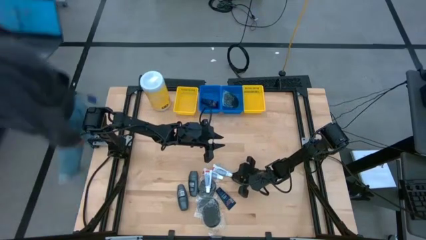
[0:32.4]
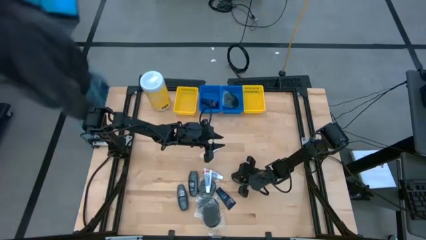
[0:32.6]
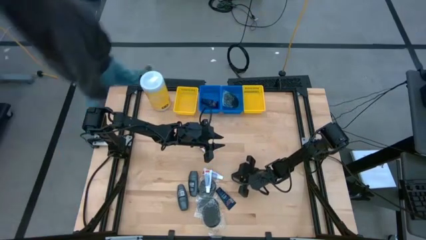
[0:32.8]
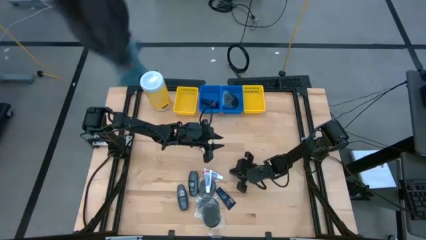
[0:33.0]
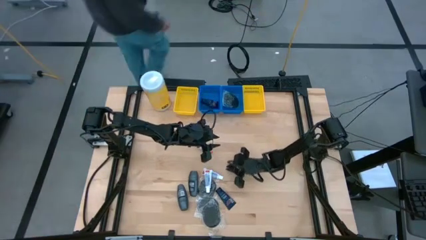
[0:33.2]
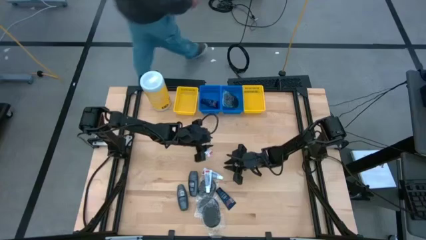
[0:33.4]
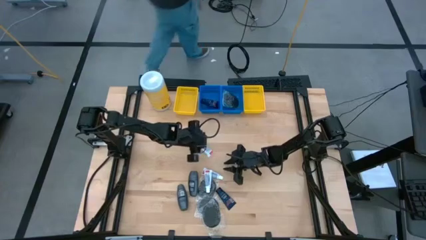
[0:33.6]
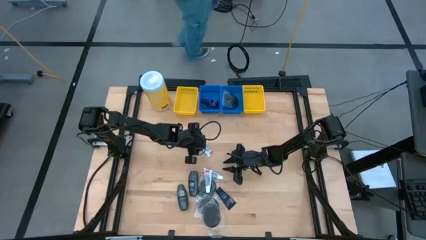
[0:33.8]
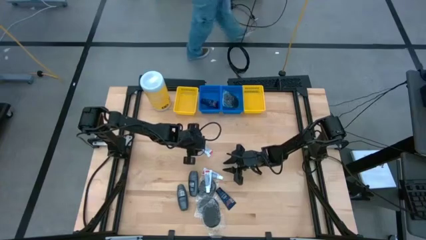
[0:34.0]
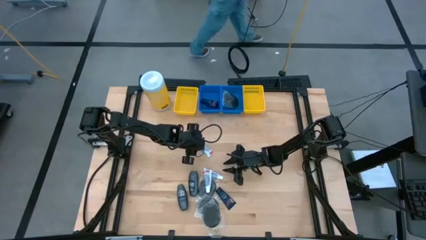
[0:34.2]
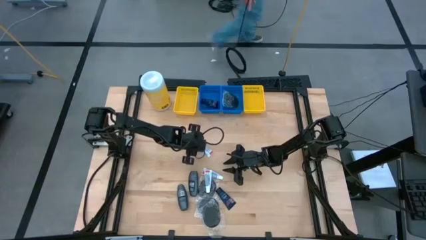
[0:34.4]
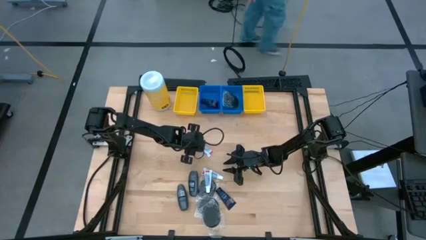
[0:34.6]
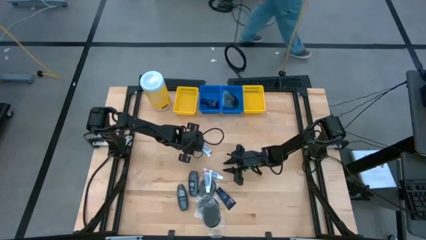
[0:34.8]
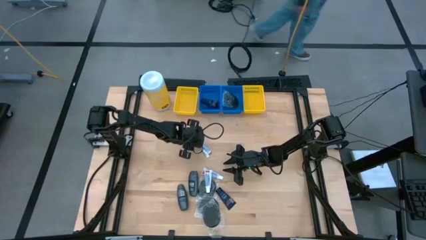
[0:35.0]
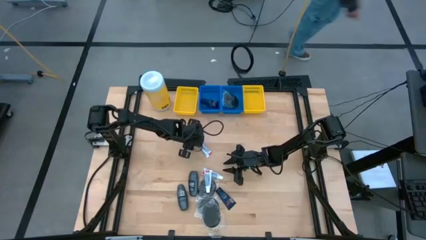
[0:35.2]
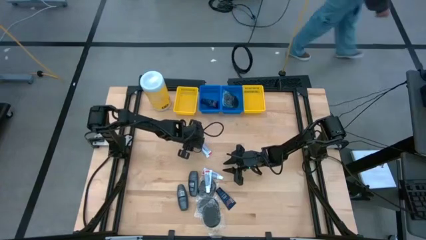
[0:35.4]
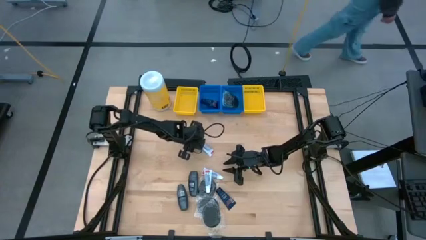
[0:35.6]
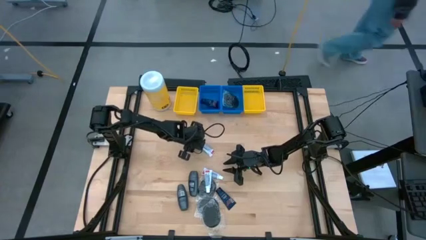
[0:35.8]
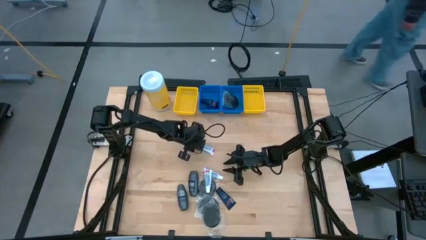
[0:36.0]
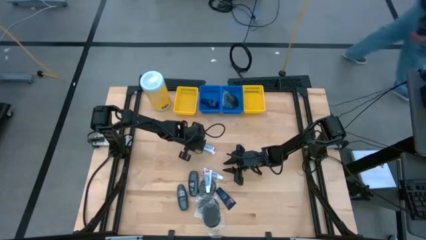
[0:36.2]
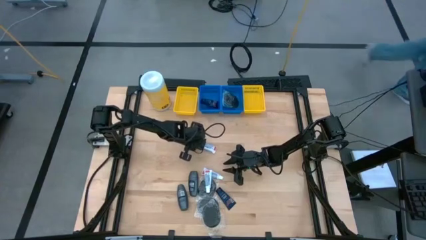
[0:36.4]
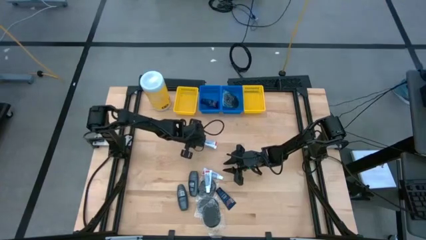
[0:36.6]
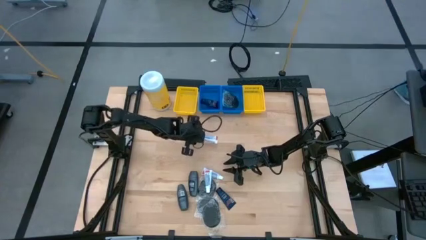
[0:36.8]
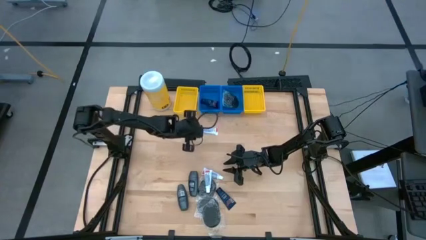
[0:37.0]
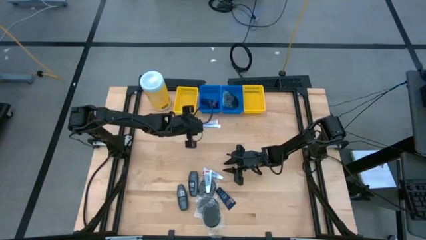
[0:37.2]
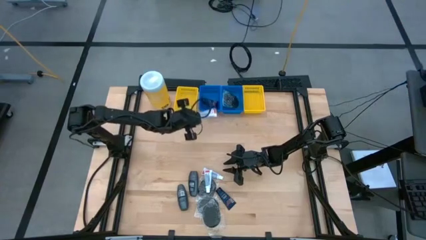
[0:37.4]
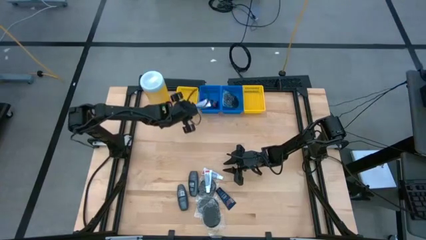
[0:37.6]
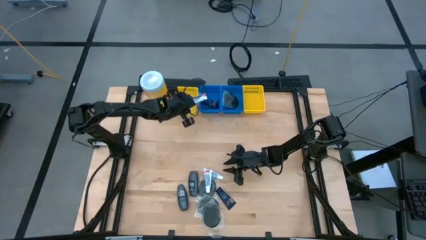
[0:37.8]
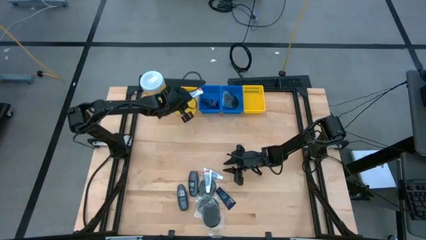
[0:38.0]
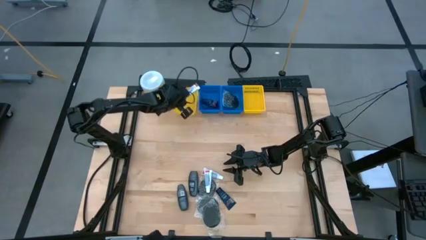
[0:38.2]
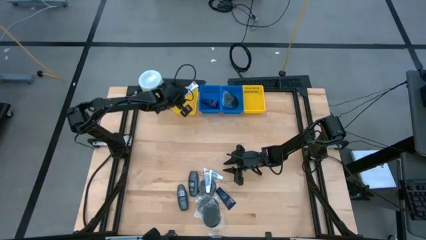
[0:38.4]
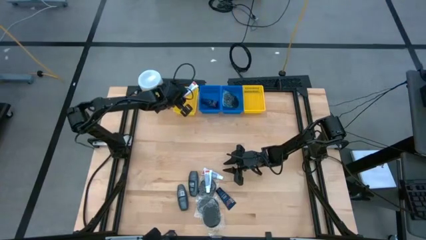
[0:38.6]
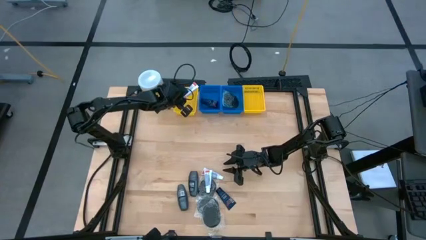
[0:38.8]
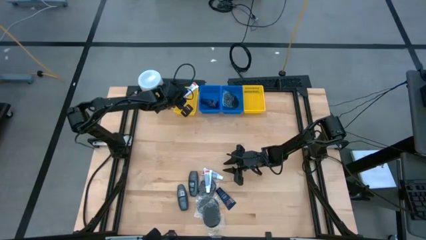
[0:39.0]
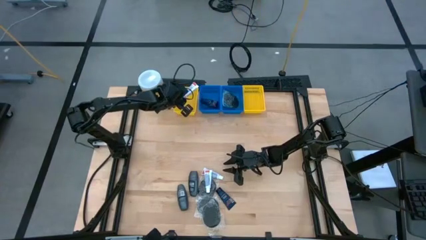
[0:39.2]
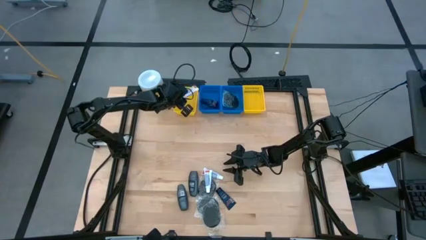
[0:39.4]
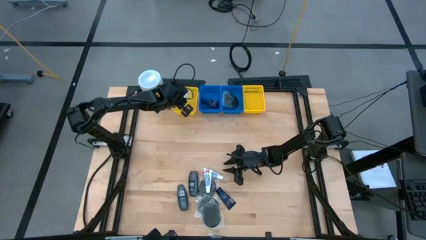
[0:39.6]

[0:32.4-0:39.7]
Task: Pick & Place Travel size toiletries
Put the toothpaste into the left yellow bin

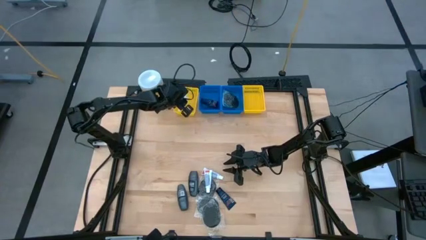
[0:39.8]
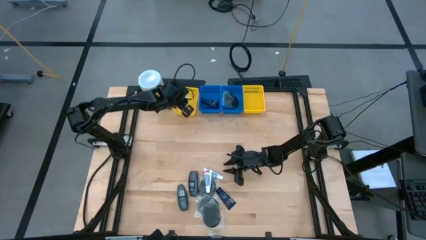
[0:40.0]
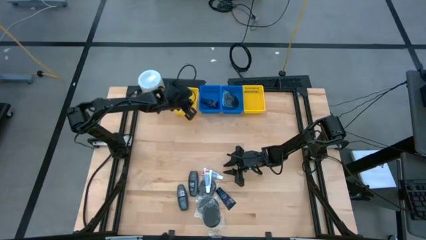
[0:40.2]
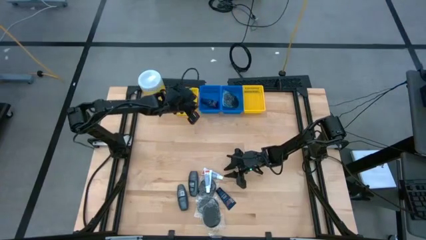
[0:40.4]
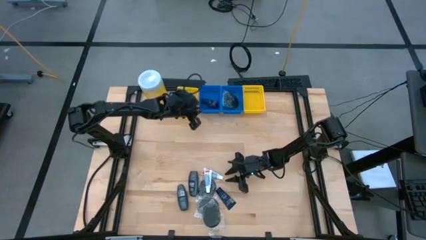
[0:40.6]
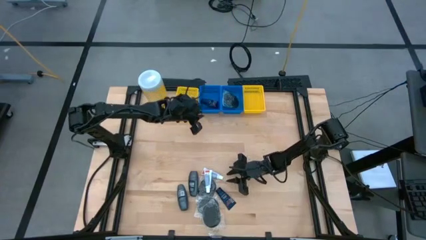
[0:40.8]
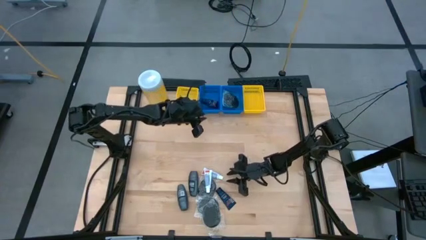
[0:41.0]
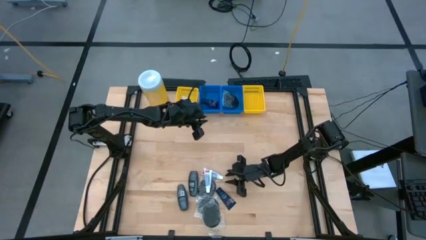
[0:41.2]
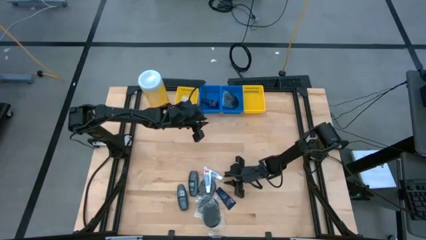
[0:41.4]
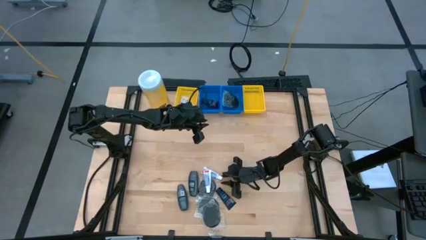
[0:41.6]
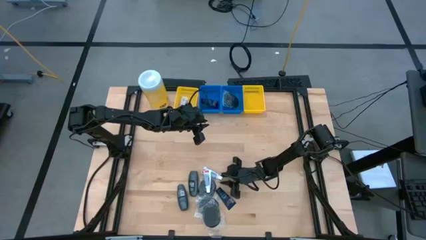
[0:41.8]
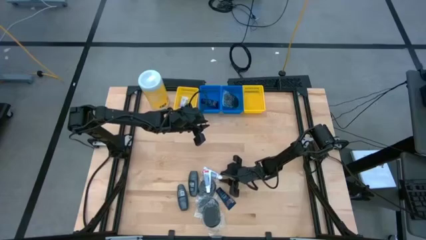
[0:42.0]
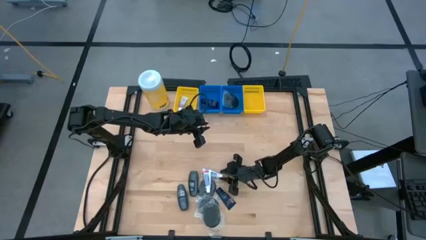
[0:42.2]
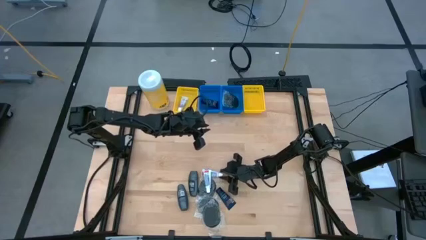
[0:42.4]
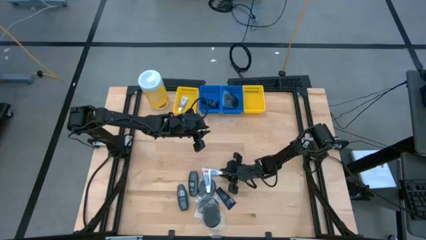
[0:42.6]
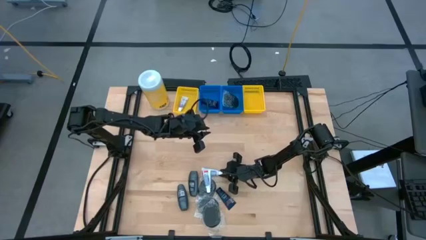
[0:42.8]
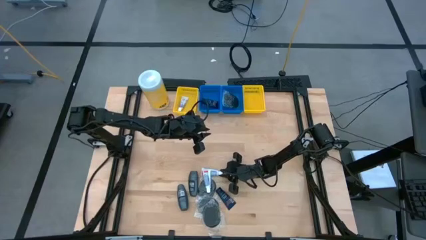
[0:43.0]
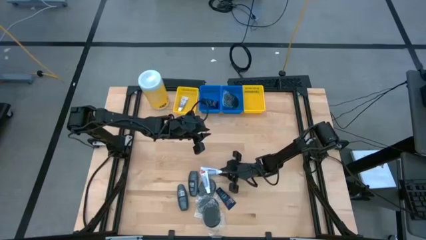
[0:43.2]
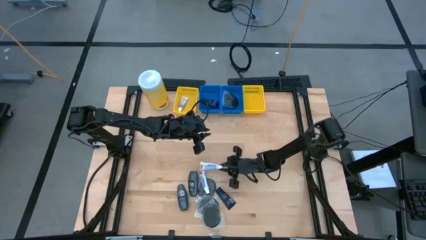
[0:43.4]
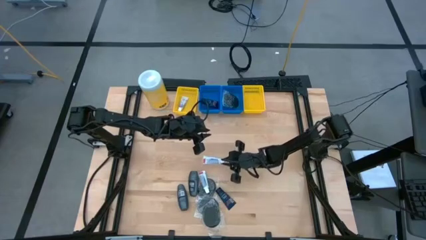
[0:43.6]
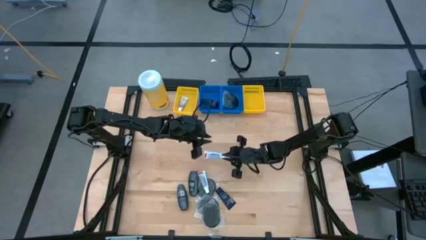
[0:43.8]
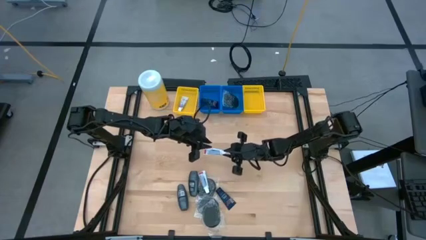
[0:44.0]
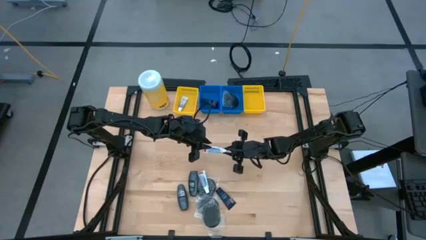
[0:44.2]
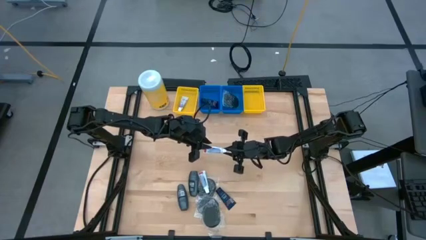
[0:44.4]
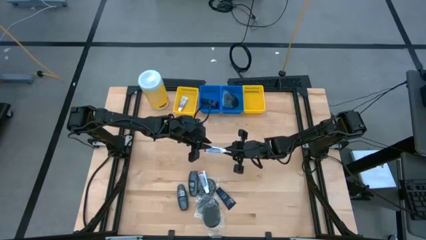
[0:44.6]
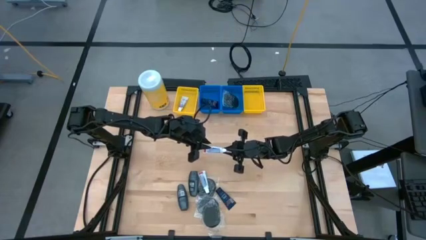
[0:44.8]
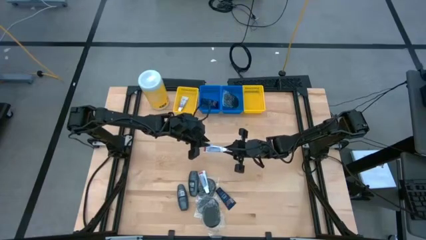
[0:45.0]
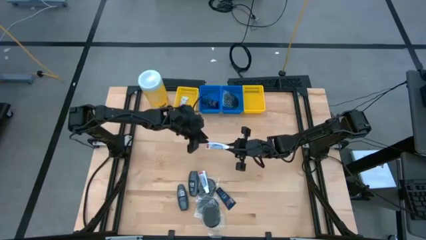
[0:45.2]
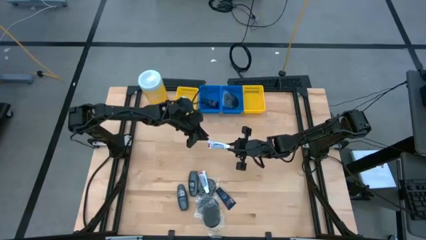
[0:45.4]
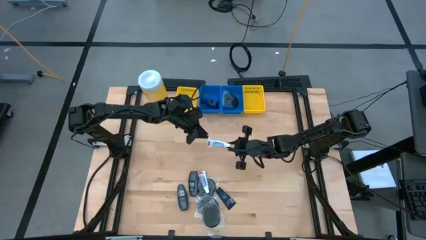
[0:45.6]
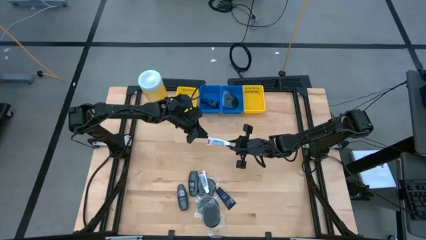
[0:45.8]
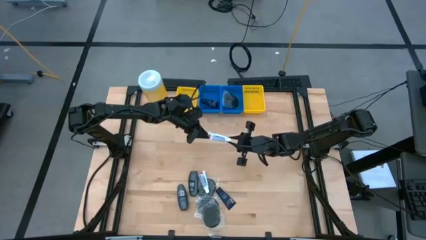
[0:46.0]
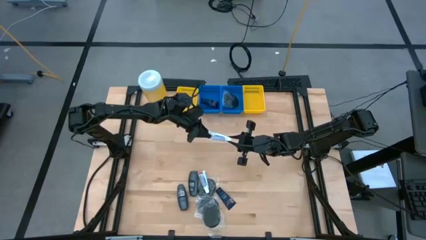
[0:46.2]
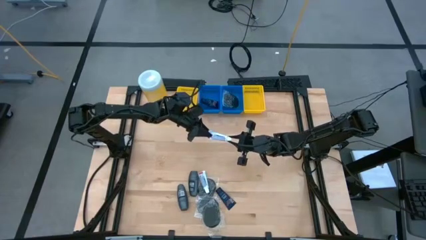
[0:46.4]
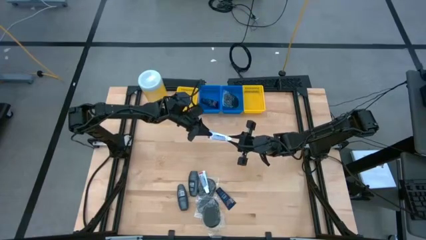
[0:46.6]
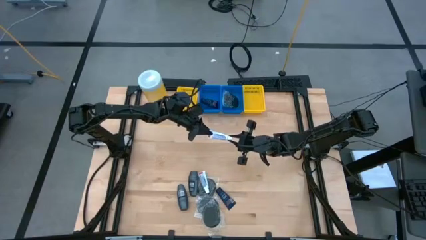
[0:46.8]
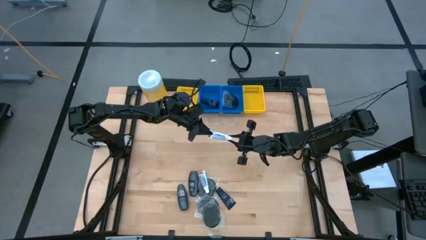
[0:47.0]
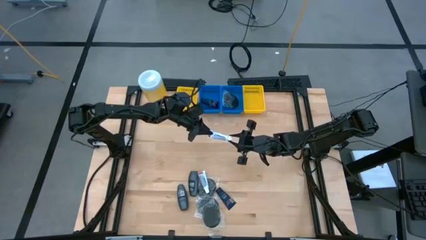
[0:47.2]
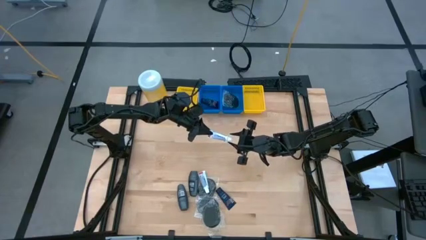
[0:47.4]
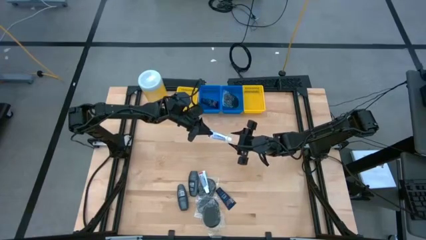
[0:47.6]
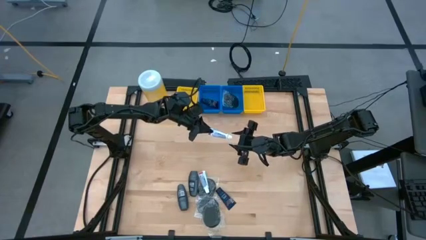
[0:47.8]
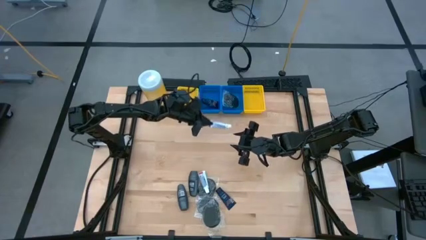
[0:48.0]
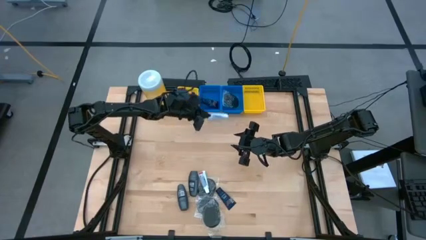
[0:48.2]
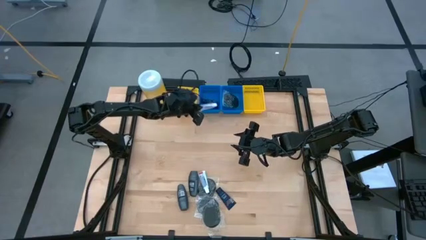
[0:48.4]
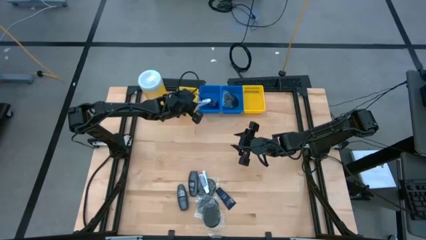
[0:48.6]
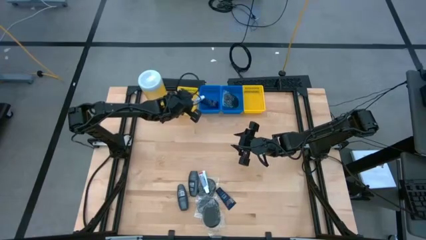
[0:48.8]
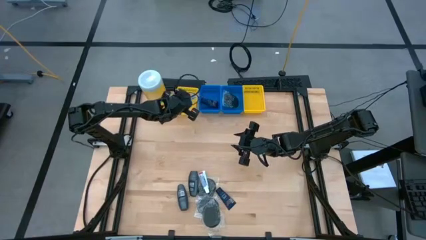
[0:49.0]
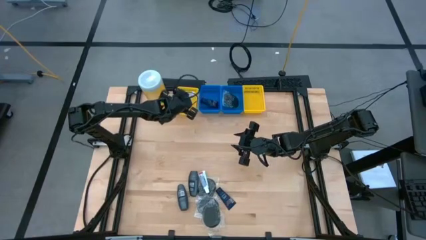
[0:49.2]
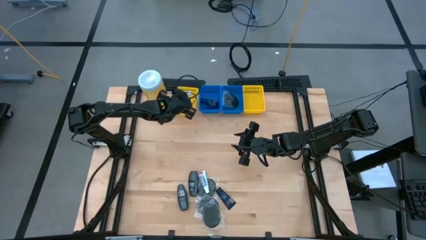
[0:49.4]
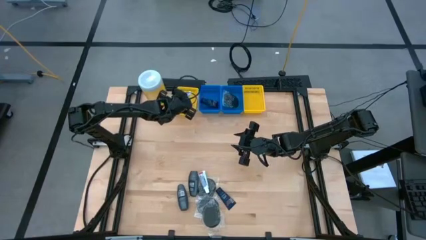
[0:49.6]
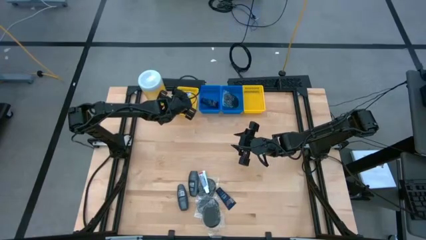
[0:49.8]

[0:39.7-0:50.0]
Put the toothpaste into the left yellow bin
